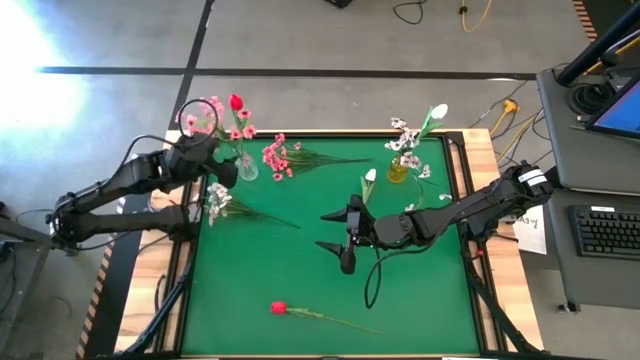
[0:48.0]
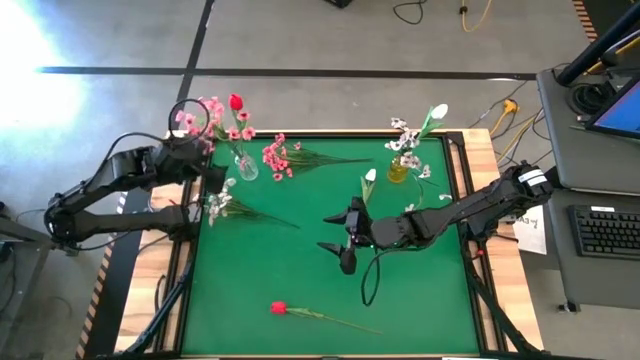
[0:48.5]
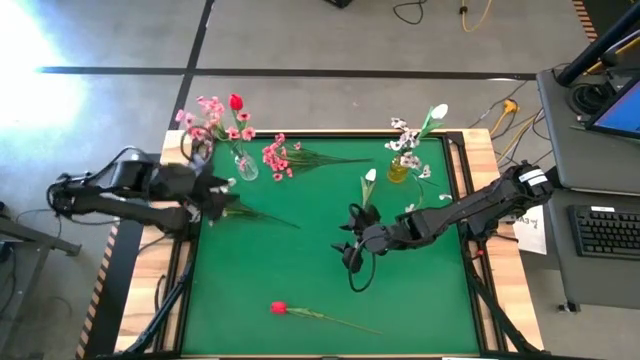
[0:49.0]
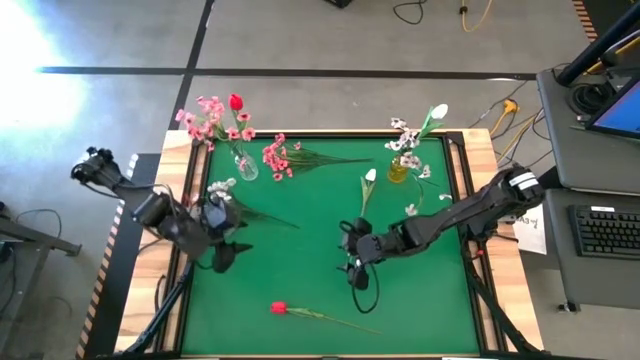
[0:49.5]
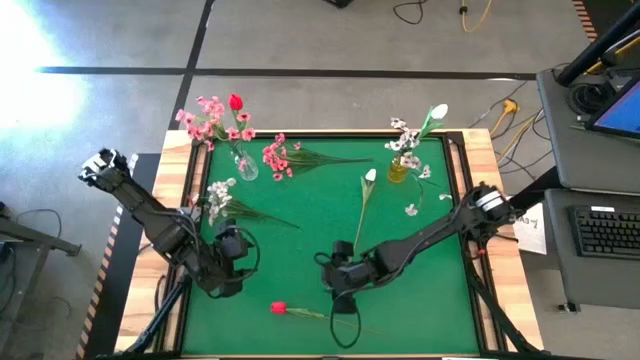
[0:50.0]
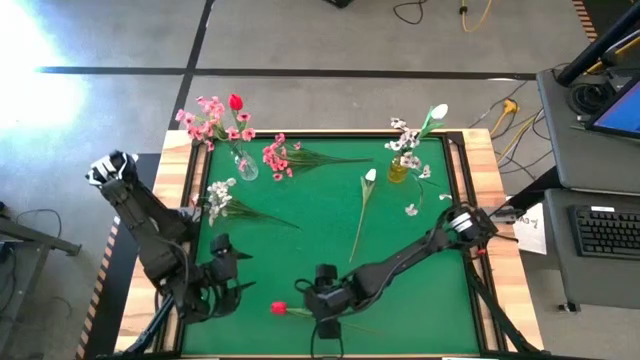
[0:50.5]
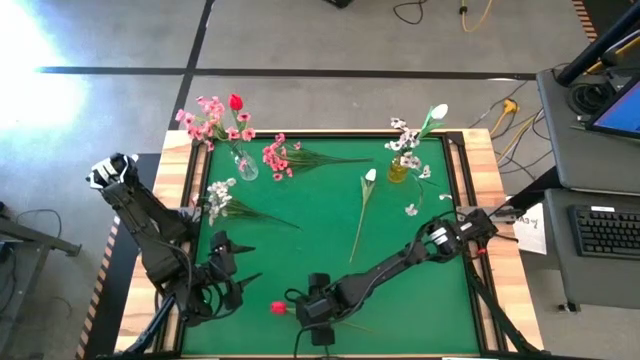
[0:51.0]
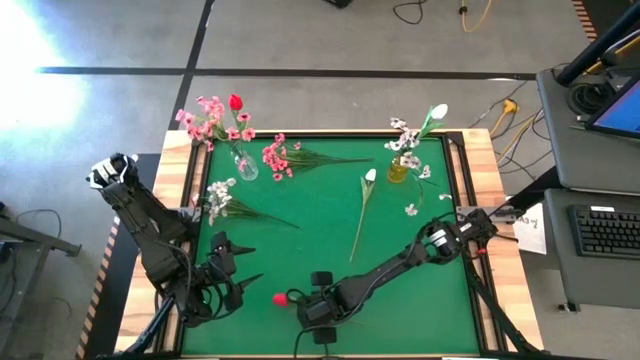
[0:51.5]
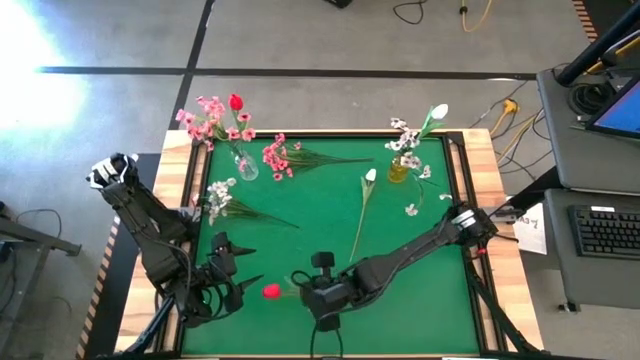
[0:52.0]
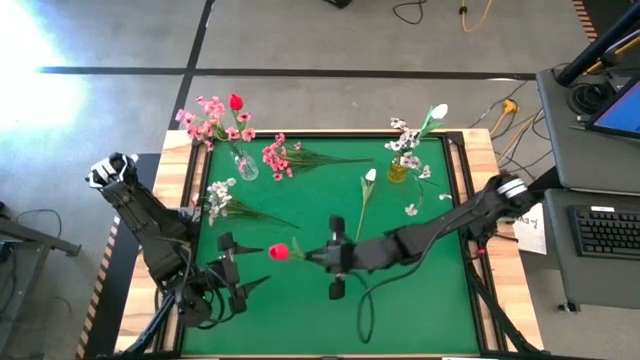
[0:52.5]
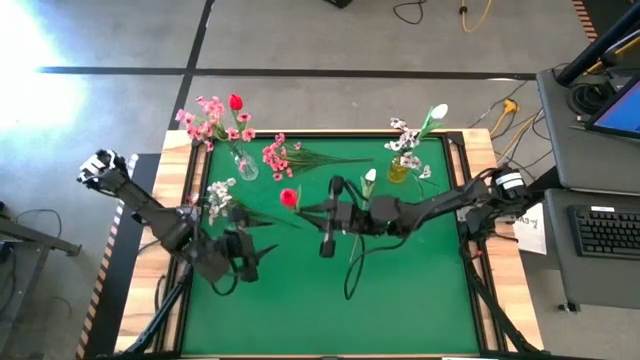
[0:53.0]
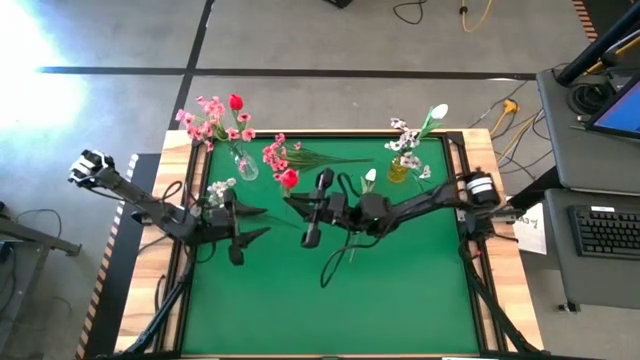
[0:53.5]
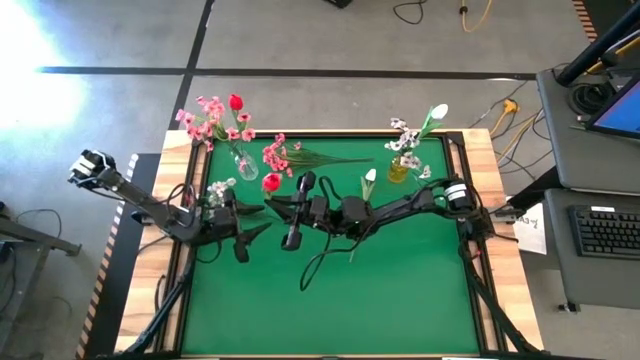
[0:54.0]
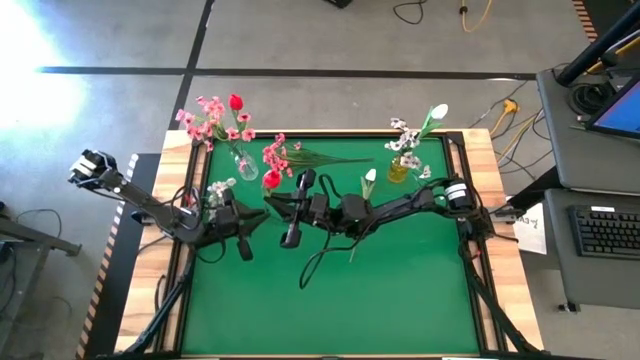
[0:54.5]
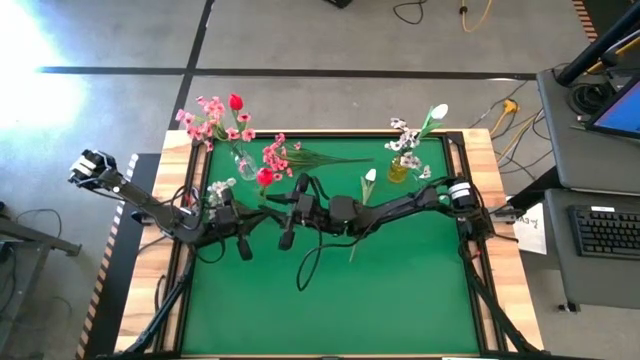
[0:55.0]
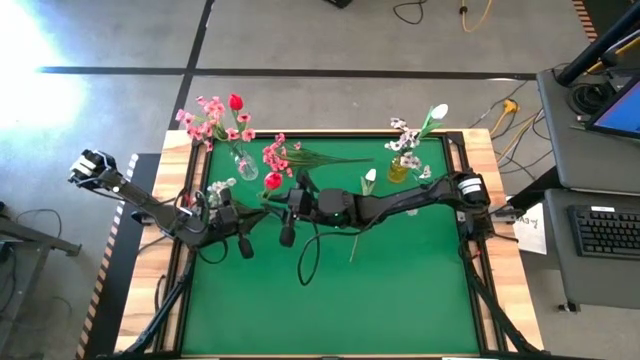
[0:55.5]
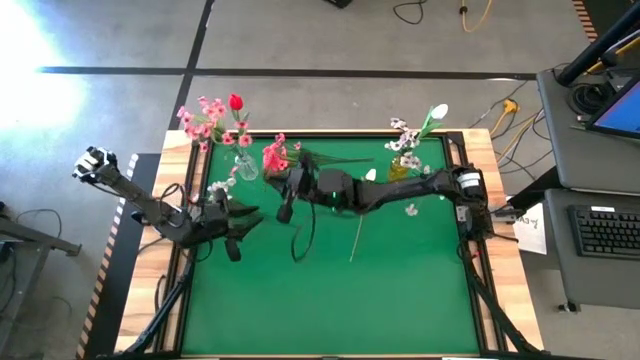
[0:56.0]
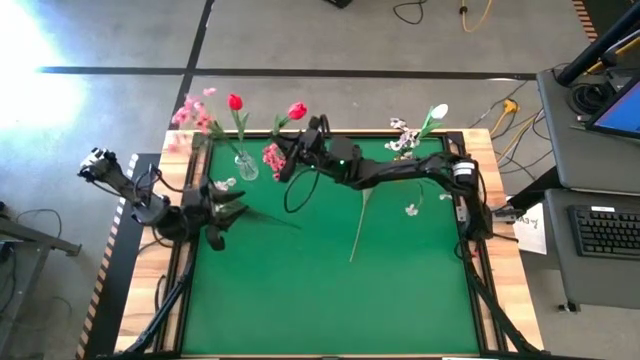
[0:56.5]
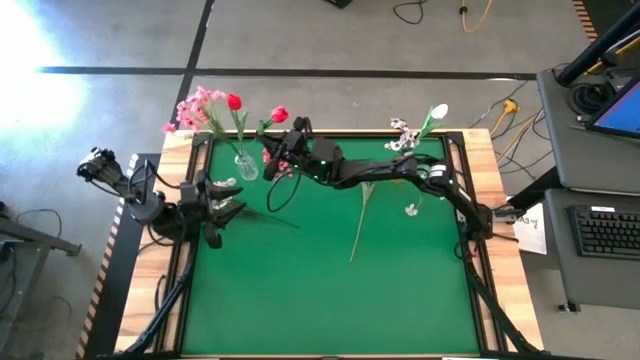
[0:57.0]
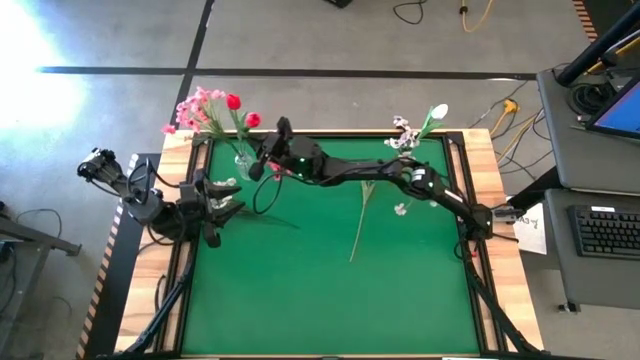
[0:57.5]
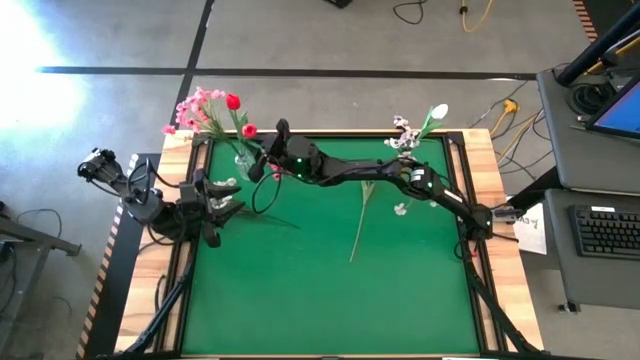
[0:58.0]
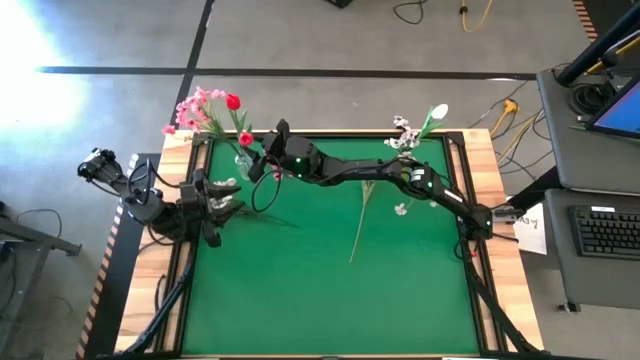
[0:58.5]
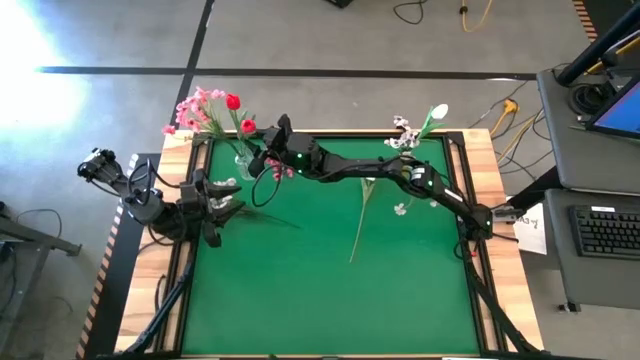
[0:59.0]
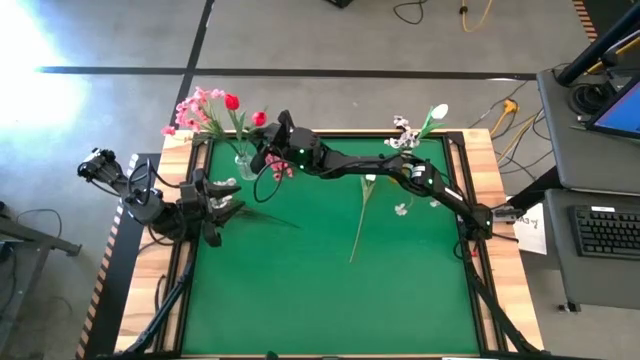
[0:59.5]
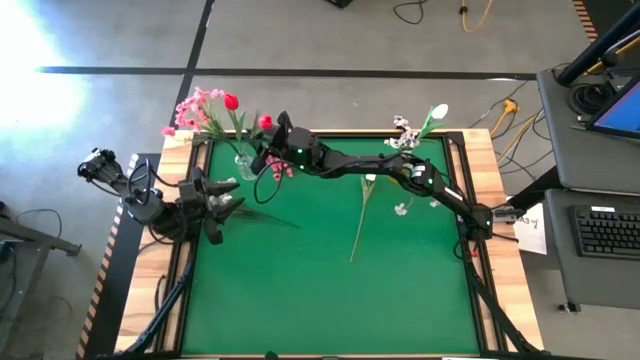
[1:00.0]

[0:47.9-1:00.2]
Task: Sort flowers into vase by color
Put the red tulip into the transparent vase

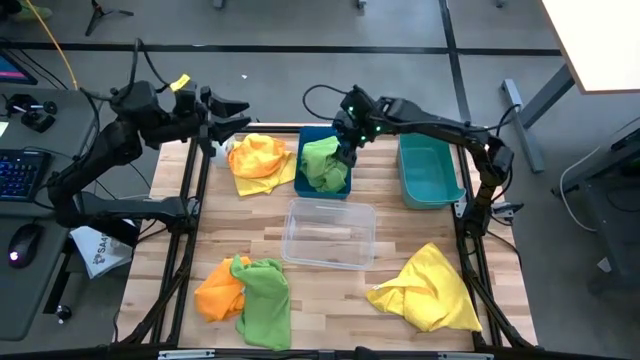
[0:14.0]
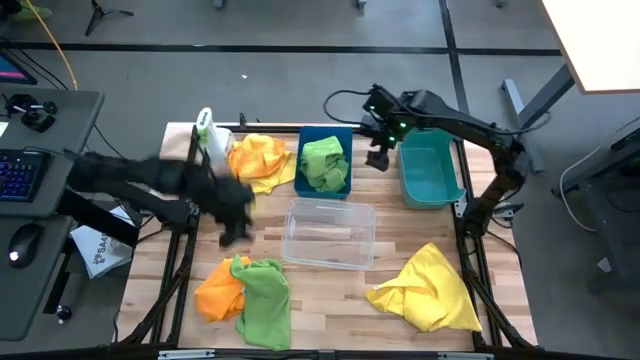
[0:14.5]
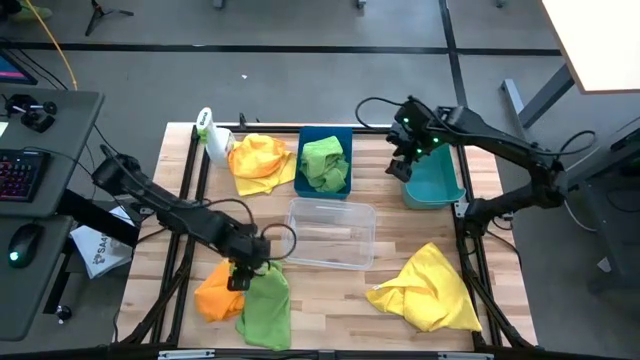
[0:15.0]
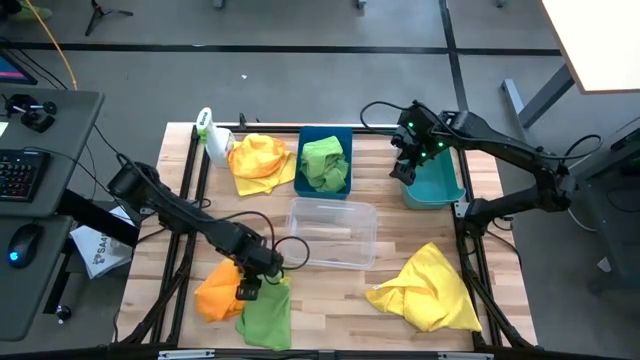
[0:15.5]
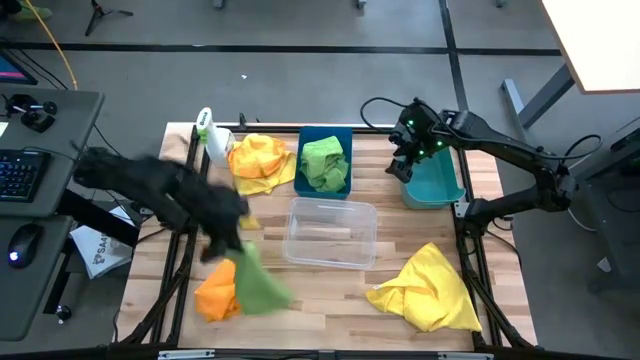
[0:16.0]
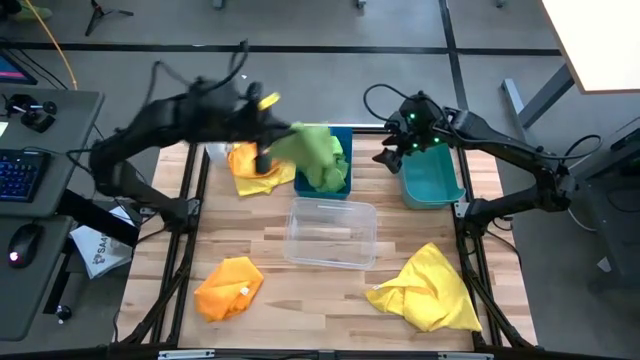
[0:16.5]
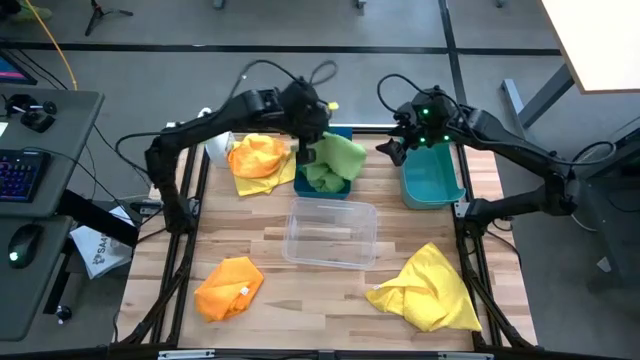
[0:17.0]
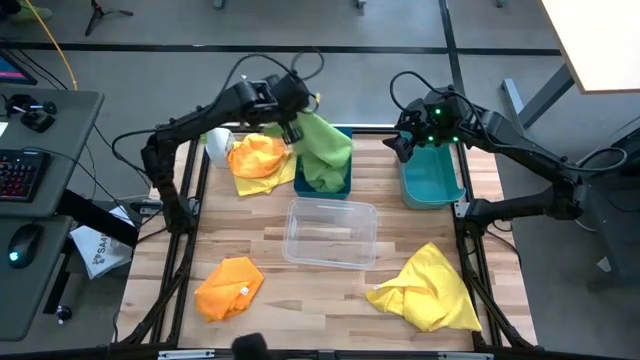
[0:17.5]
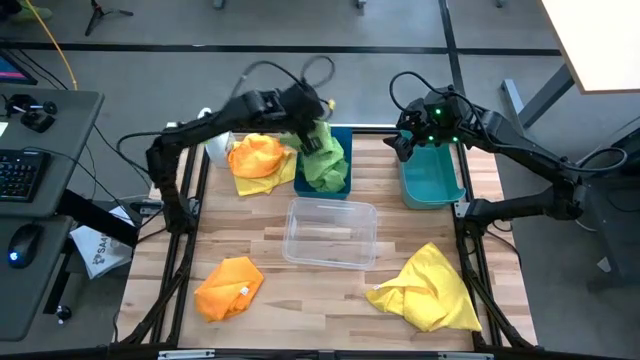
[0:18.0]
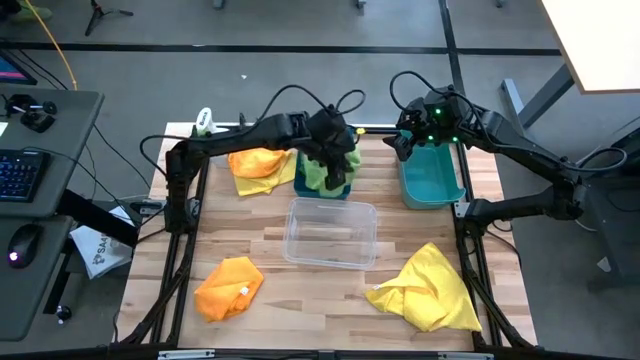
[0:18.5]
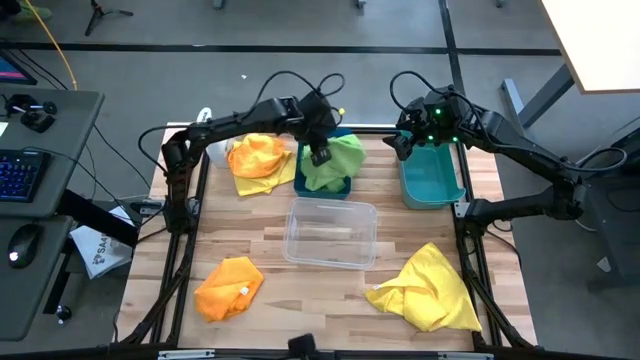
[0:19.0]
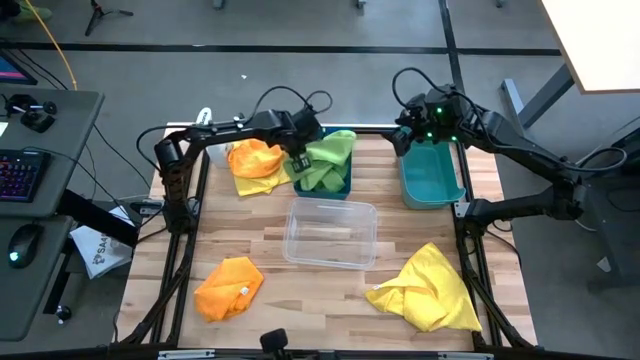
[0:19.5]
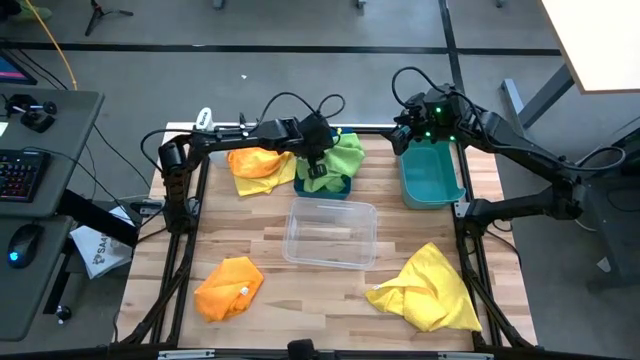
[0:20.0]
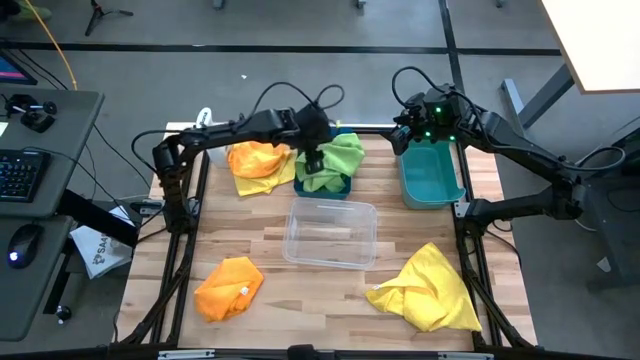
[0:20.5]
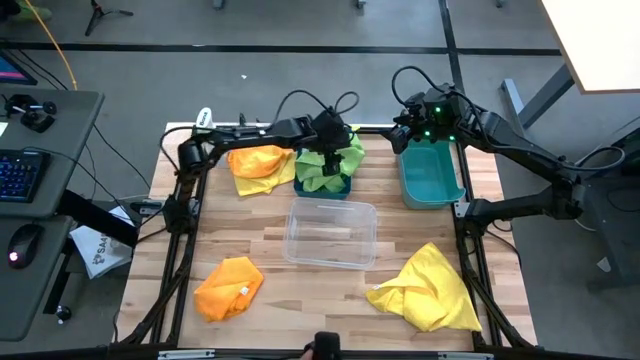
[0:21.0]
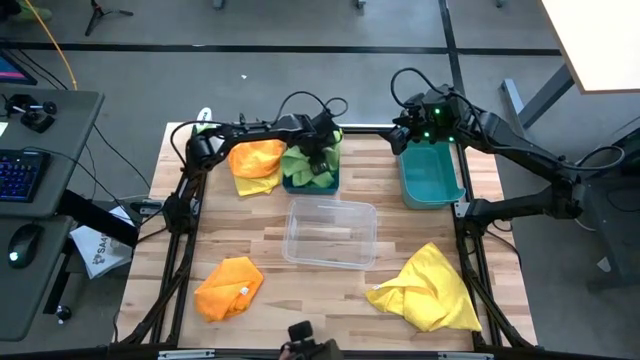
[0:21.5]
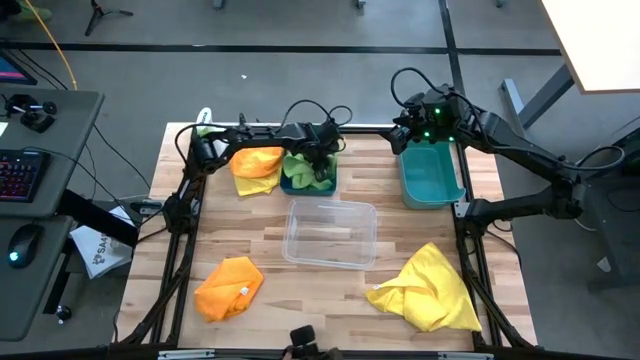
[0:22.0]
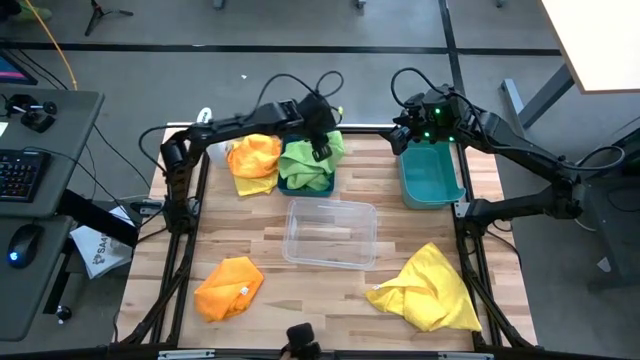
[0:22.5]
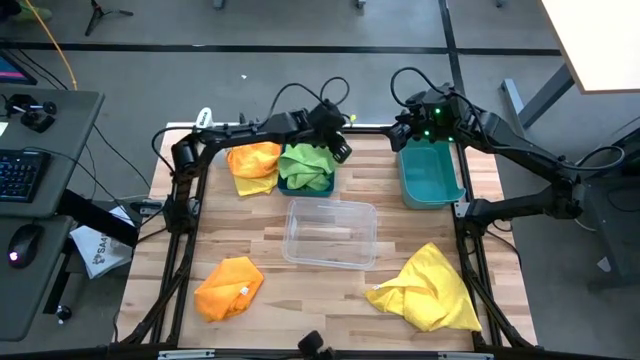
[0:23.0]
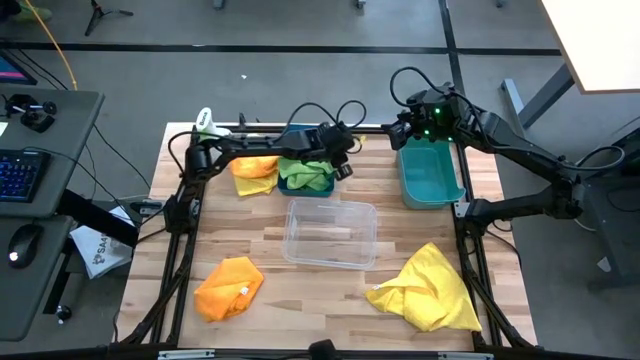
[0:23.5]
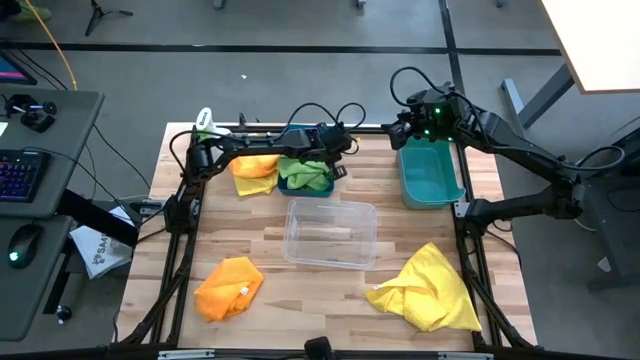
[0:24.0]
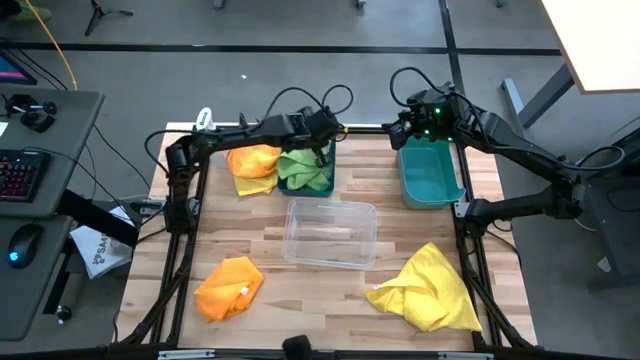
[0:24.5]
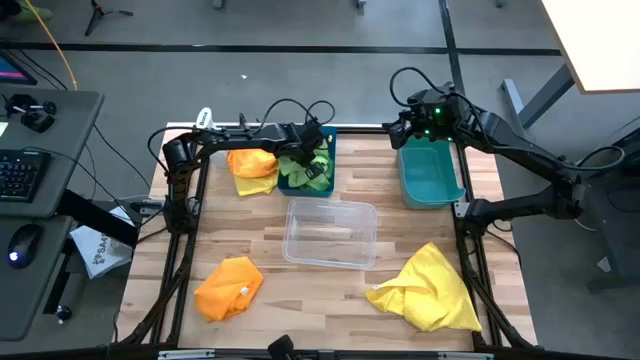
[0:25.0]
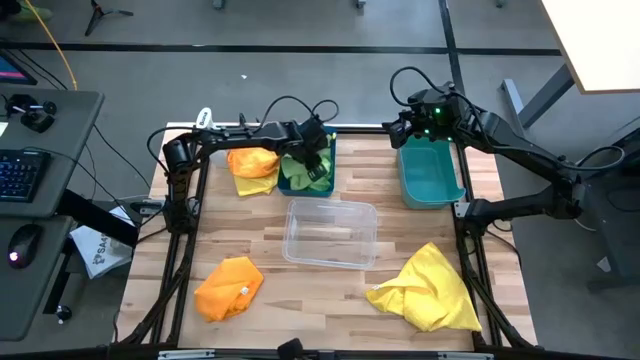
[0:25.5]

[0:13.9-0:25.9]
Task: Sort microfiber towel by color & place in baskets
Put the green microfiber cloth into the blue bin
